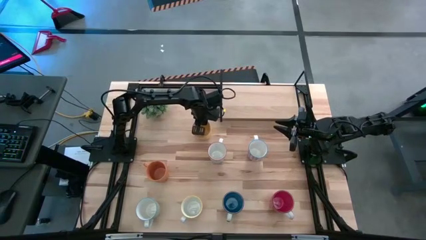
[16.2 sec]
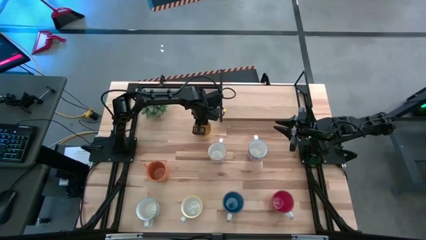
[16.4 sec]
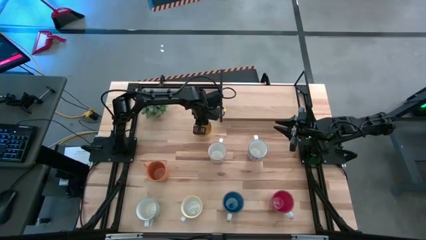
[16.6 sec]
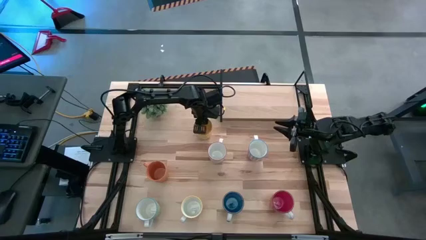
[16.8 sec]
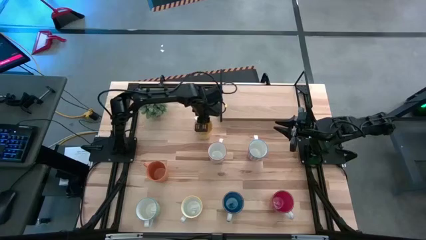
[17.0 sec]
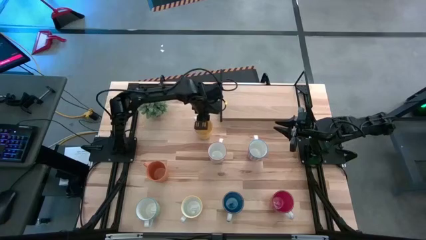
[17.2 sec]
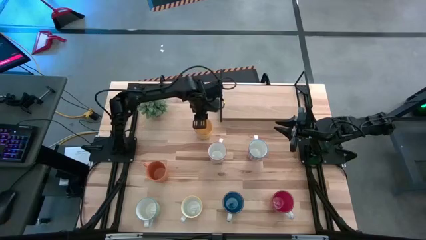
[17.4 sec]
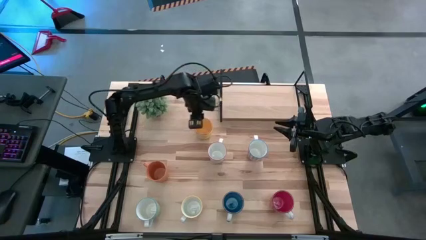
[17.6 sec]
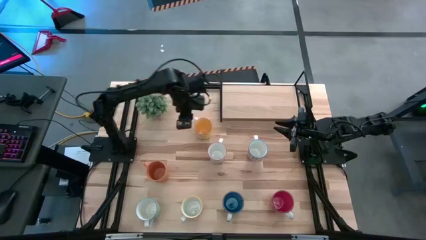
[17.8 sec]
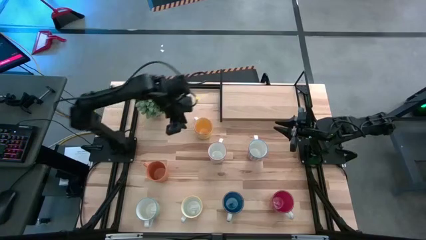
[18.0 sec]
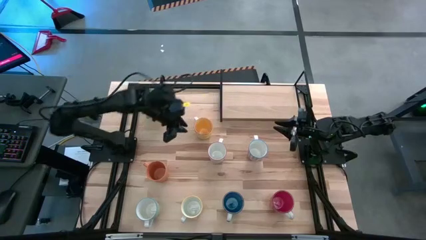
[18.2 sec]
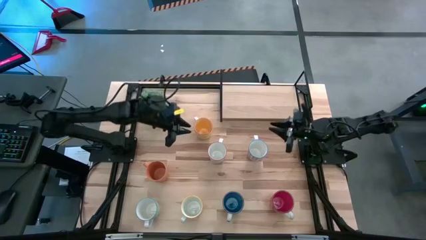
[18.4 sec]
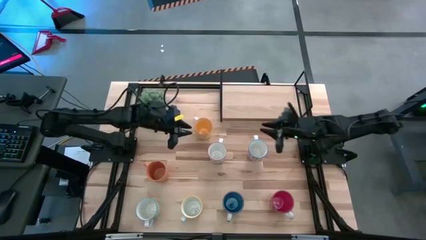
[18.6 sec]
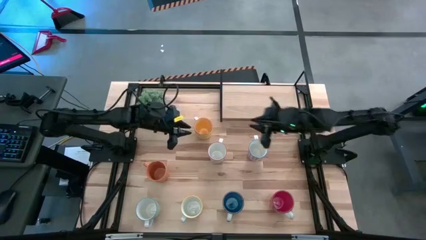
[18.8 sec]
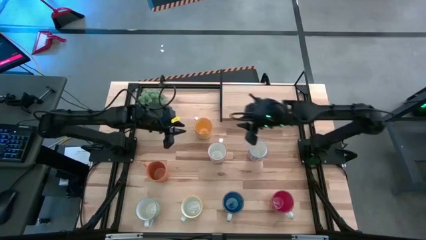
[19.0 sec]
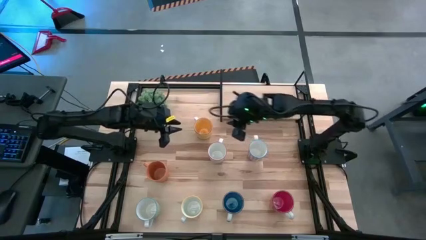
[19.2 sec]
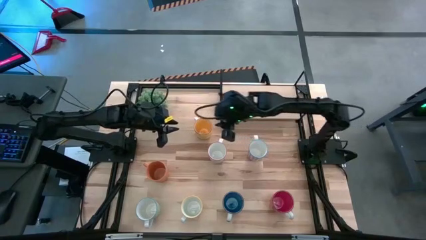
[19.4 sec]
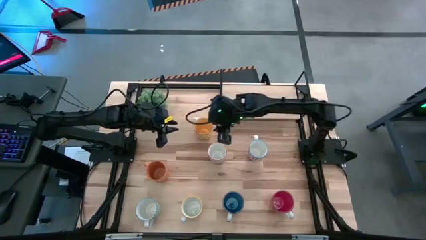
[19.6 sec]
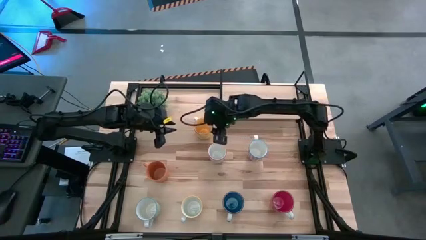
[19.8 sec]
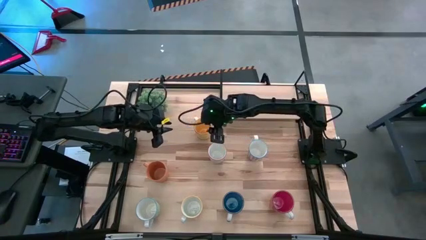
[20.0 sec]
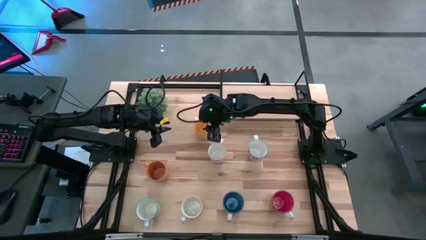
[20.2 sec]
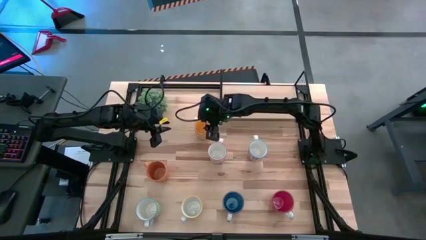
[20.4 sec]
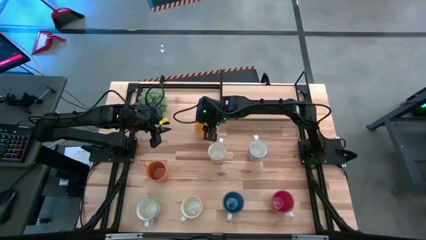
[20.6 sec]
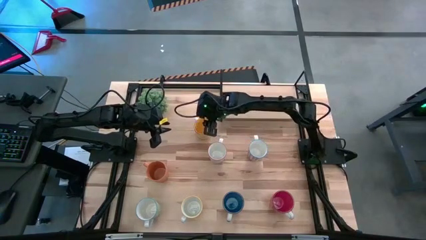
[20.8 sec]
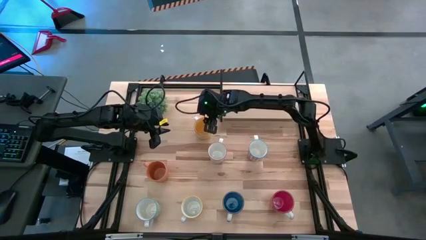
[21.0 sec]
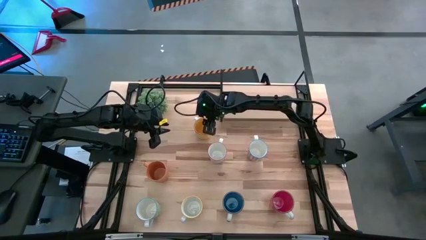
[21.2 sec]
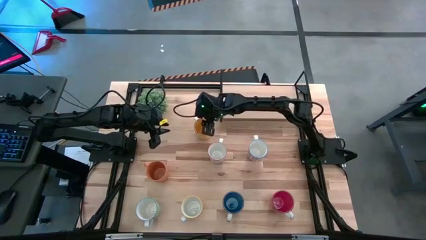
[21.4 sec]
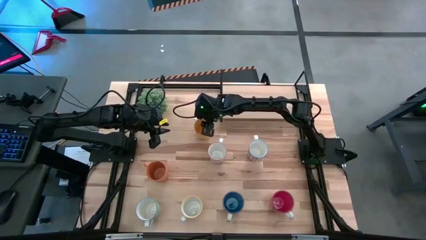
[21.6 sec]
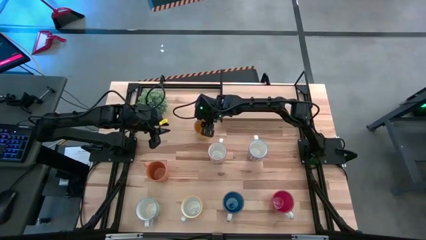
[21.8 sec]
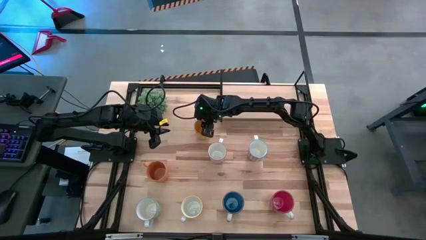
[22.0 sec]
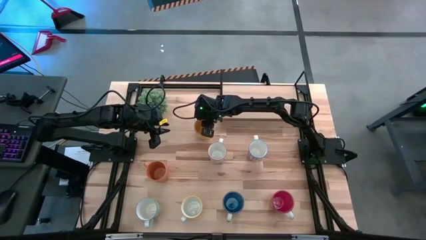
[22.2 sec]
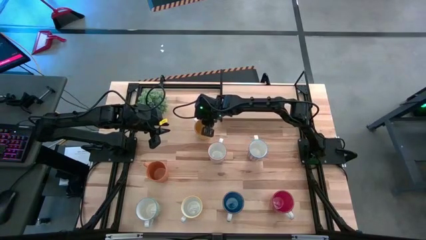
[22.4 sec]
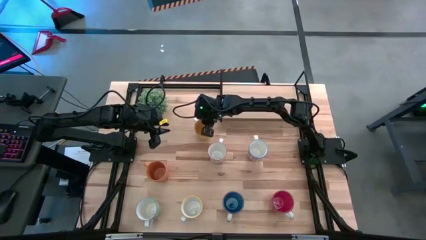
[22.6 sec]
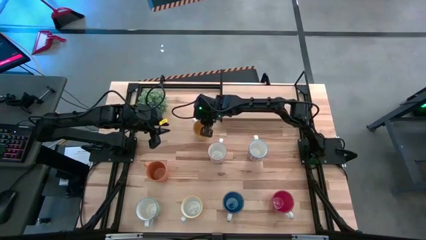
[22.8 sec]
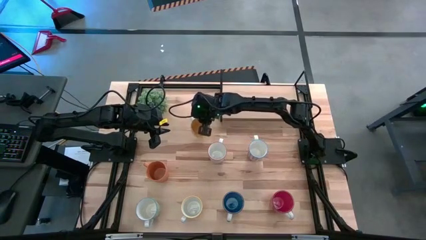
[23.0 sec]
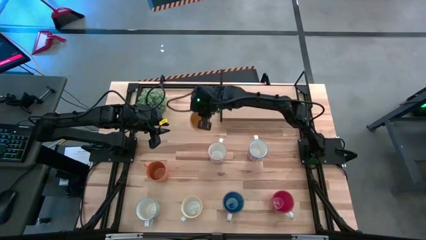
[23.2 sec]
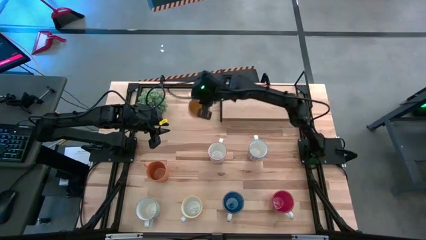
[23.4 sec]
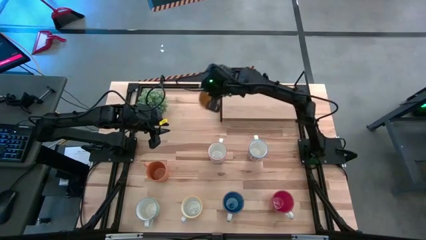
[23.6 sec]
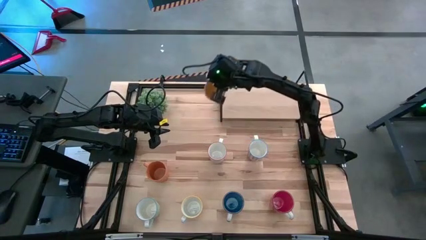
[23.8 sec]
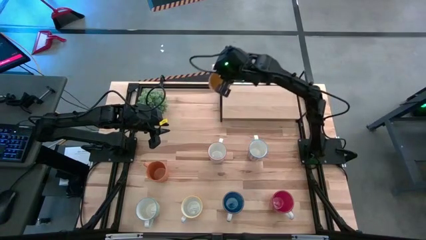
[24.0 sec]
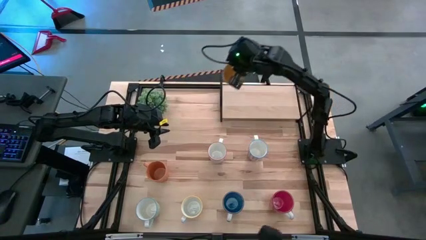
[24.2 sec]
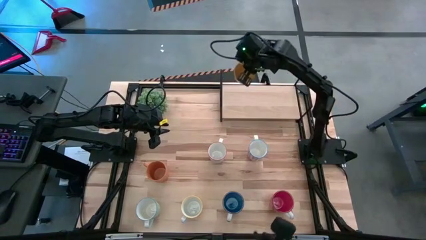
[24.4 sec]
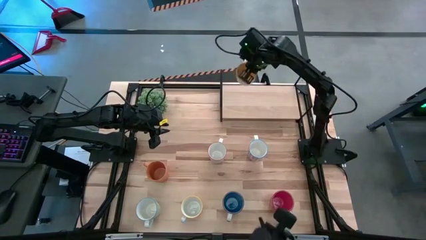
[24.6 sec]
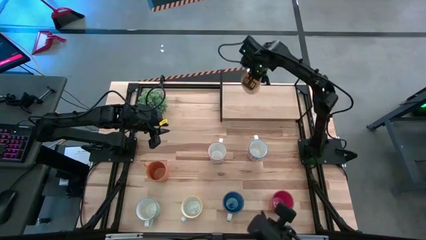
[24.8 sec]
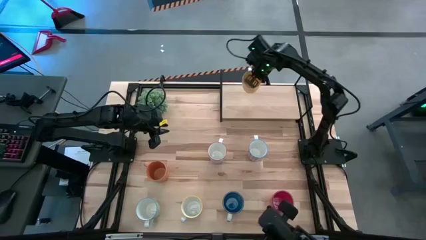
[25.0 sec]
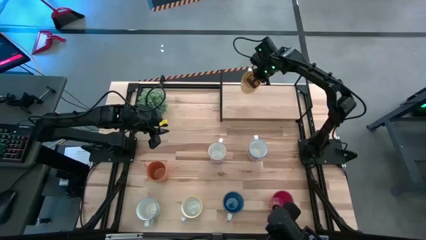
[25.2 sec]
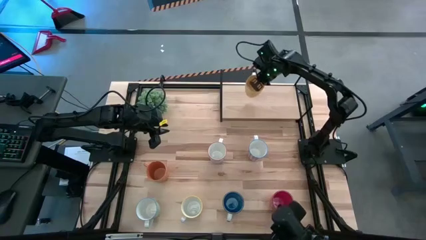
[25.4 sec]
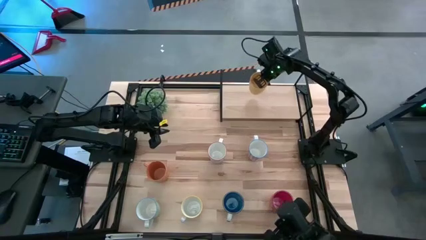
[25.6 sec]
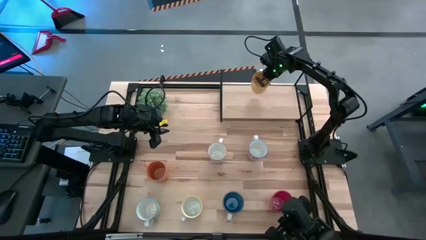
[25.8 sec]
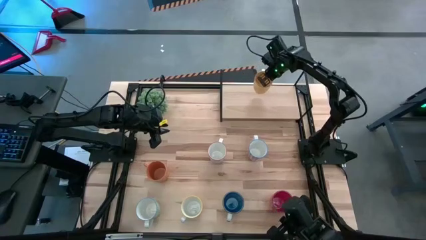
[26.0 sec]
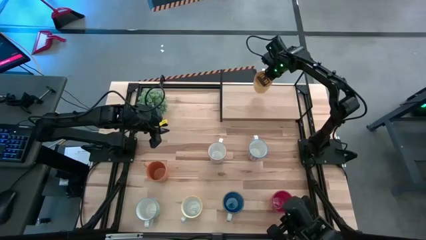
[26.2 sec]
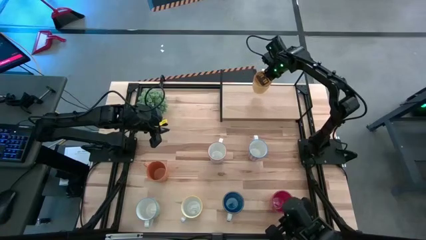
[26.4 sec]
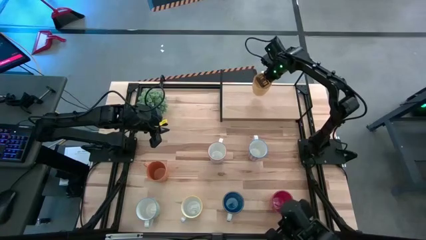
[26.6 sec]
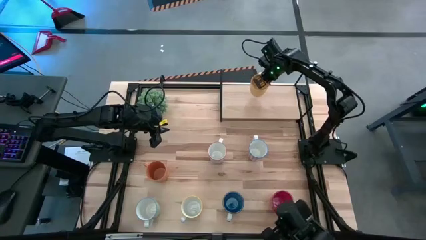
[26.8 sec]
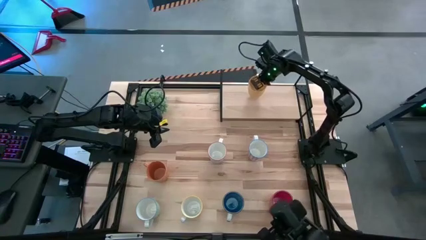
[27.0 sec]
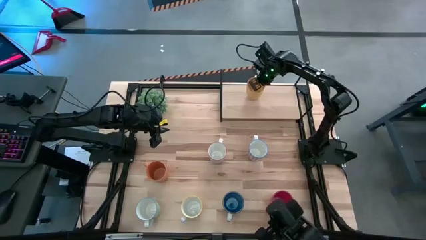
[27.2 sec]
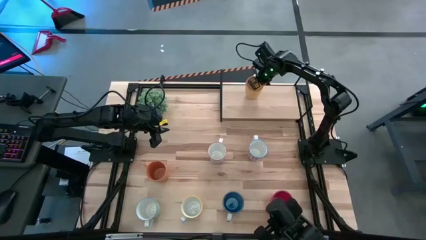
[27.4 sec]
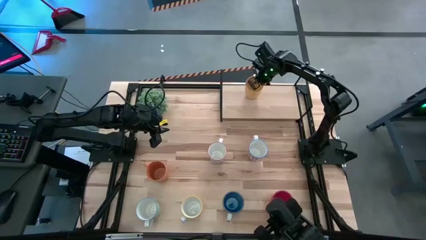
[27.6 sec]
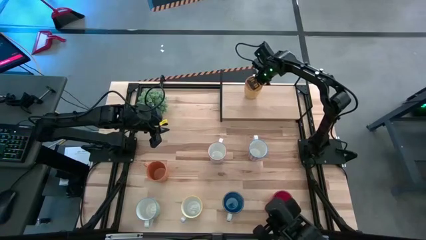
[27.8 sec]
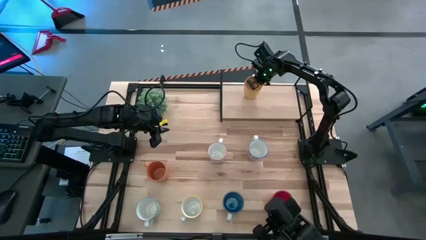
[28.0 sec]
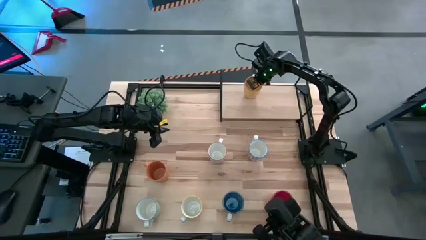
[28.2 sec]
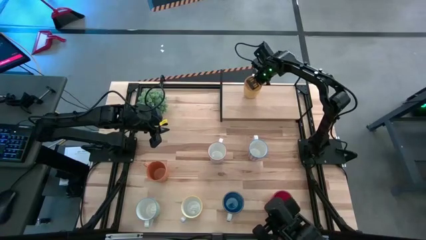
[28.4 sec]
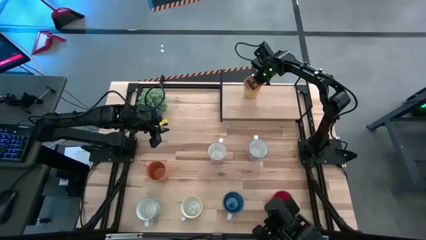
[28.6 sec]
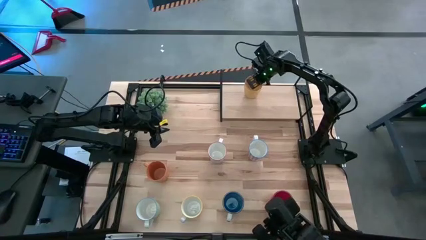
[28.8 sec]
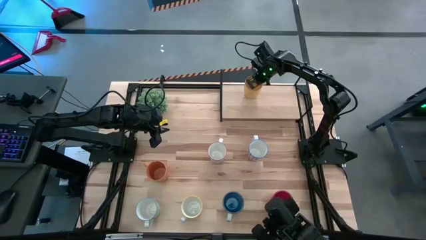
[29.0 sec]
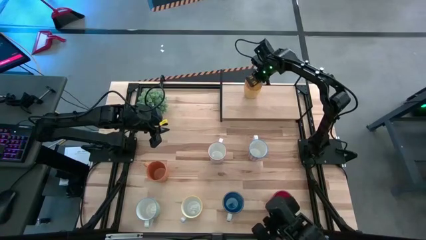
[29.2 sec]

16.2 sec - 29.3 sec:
Task: Place coffee mugs
Put the yellow mug on the shelf
